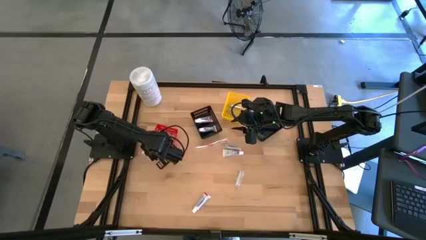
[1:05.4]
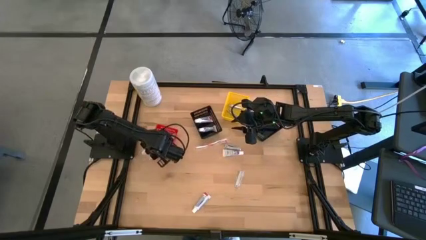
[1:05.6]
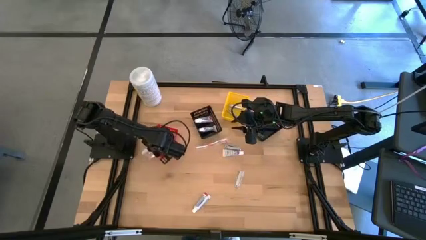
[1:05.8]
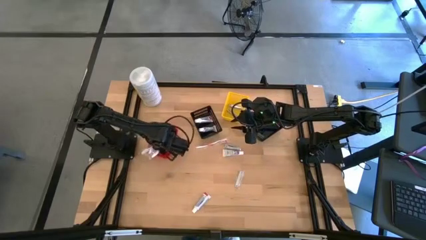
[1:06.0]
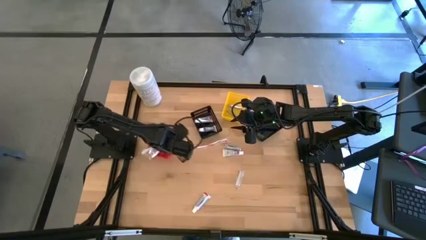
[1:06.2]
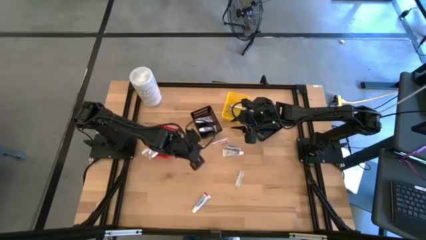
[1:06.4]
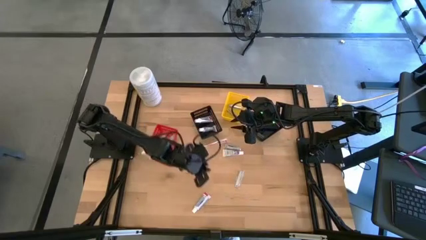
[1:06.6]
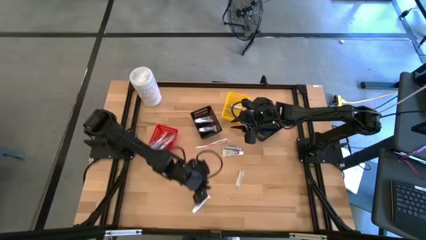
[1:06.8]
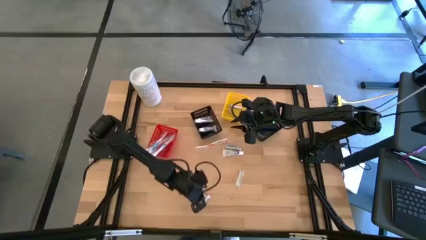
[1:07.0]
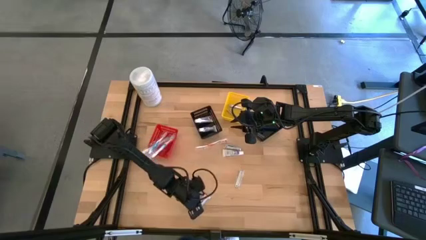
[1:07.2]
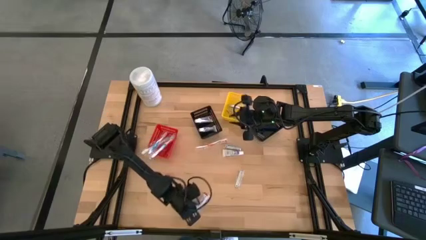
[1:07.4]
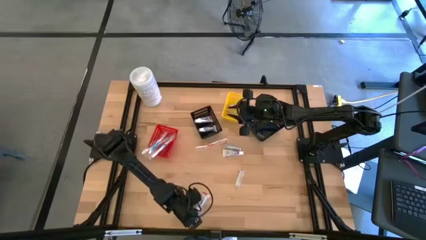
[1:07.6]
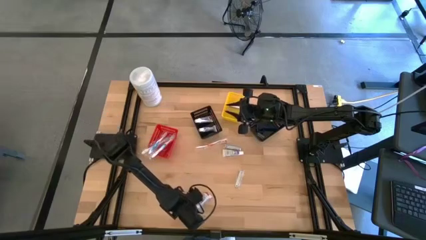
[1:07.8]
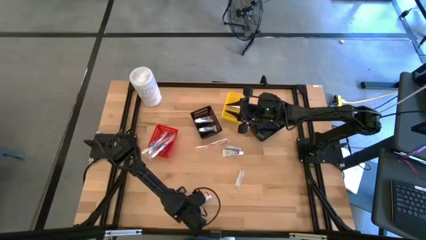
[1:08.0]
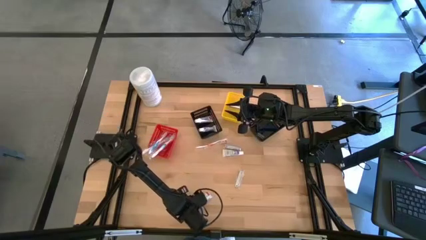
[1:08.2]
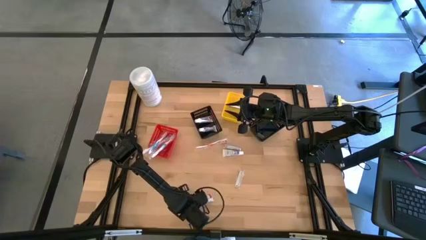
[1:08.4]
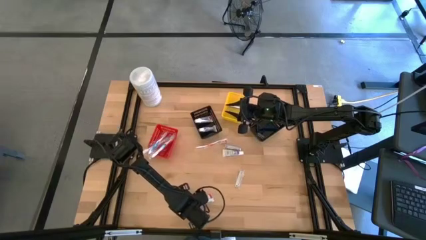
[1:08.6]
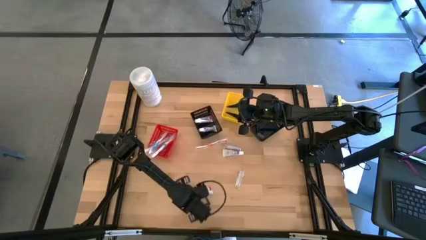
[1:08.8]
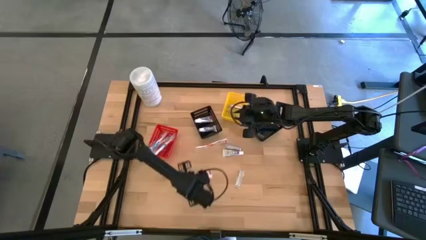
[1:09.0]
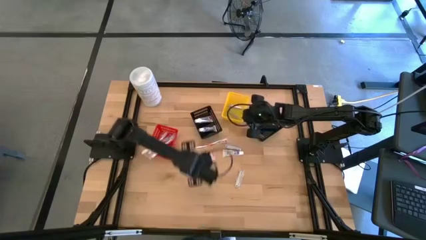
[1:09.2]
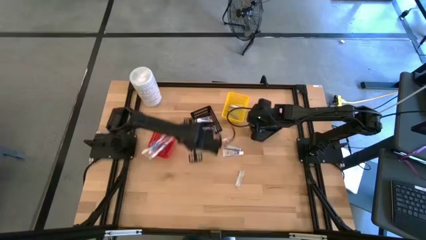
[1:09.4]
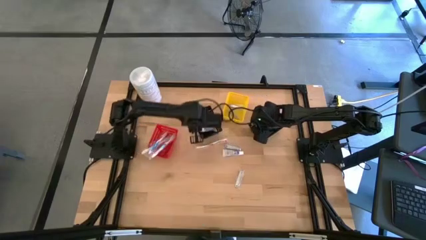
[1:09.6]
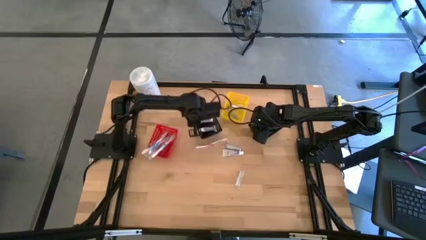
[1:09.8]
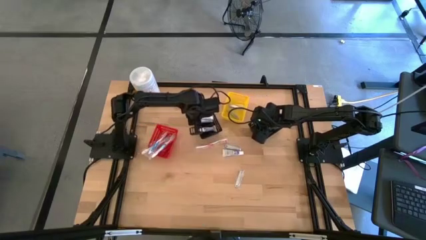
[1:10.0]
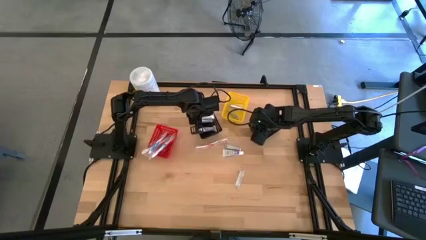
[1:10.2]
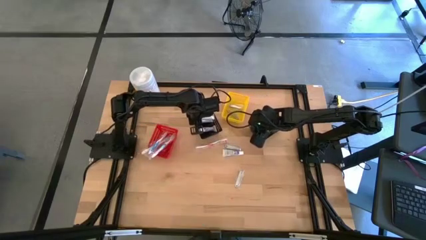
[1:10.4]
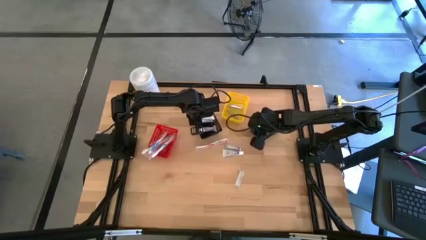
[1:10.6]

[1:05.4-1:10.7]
Task: Pick & Place Travel size toiletries
Put the toothpaste into the left black bin

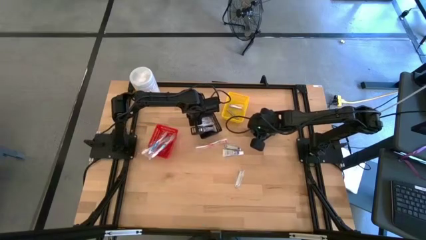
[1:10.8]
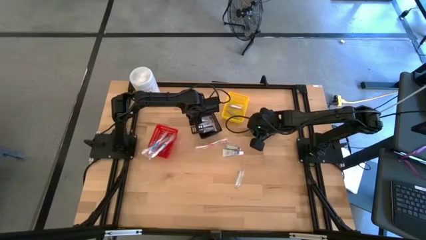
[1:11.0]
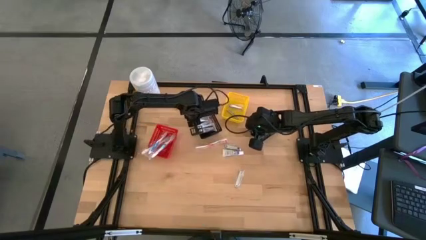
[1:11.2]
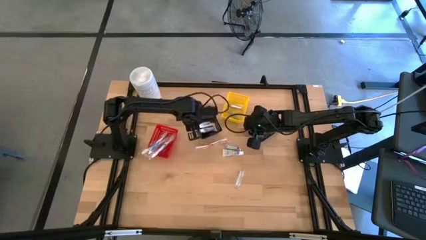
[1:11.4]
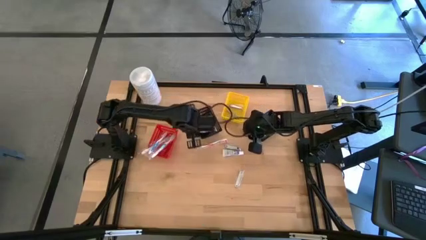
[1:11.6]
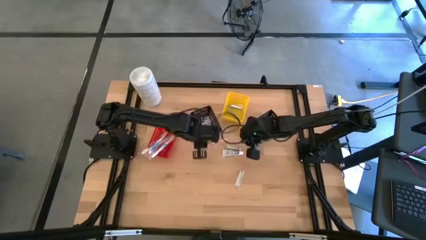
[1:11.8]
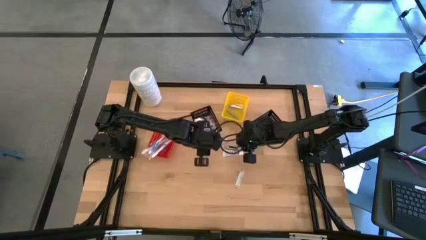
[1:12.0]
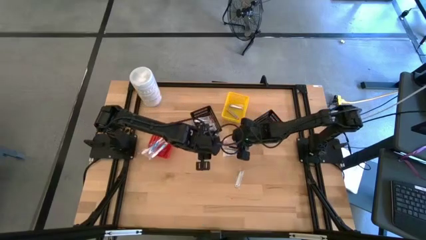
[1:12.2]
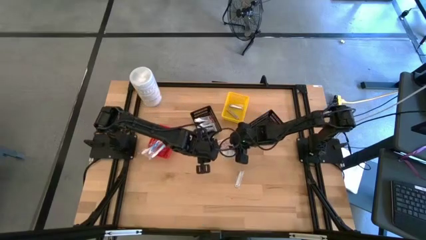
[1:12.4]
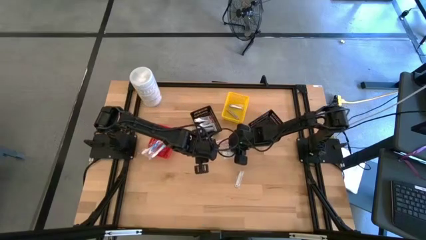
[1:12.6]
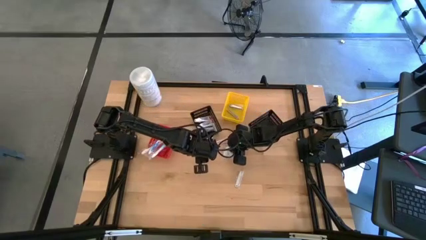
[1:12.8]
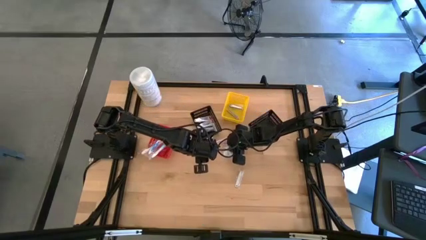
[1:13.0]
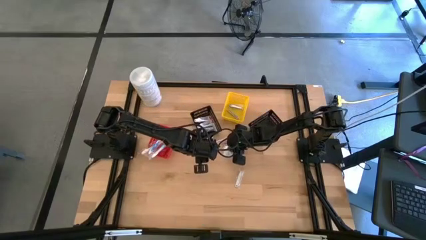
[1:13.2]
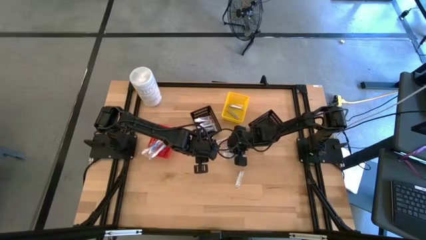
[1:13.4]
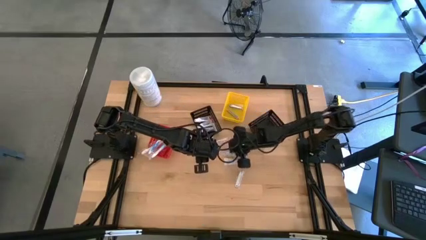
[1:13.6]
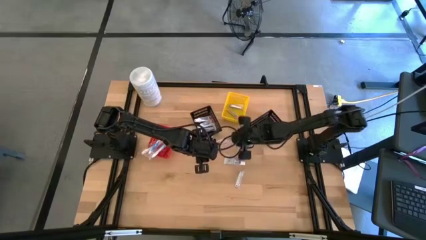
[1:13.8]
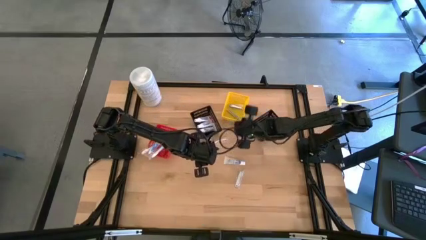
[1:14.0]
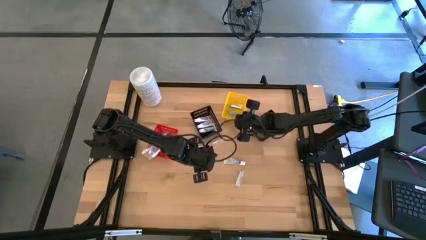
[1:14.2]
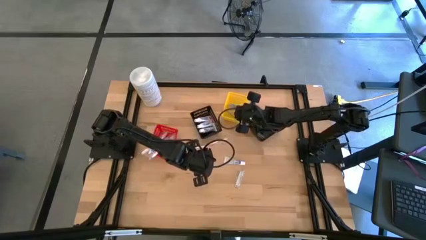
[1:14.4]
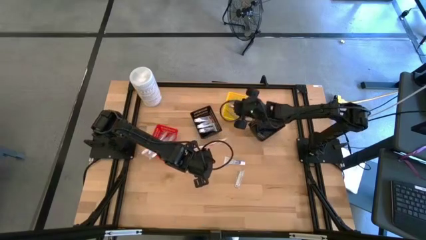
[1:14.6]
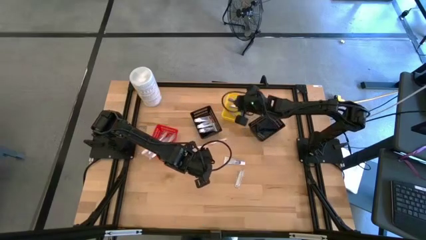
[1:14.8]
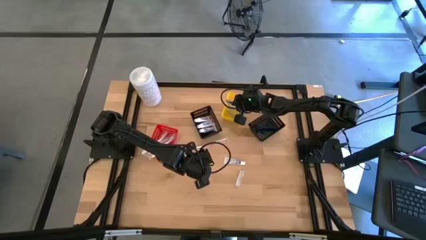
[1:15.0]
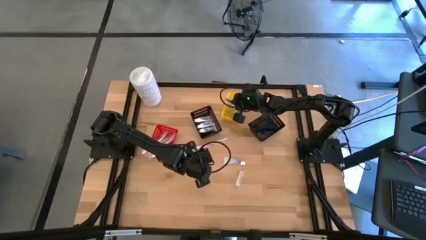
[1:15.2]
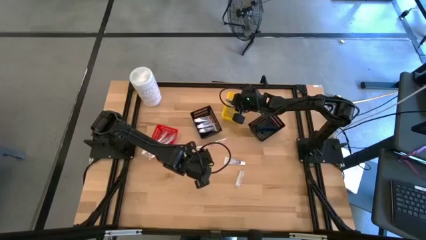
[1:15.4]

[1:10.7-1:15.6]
Put the nail cutter into the yellow bin

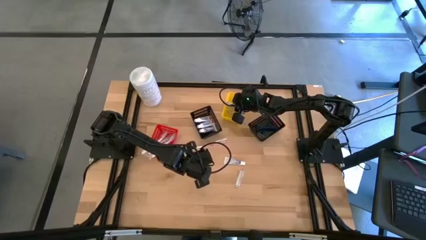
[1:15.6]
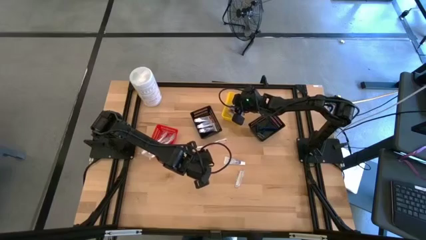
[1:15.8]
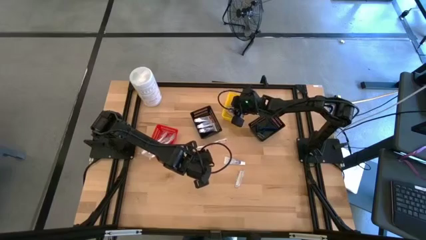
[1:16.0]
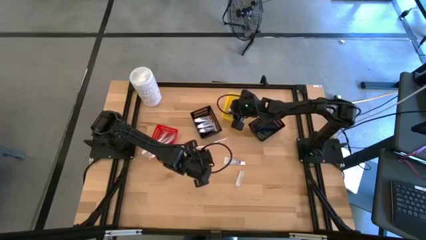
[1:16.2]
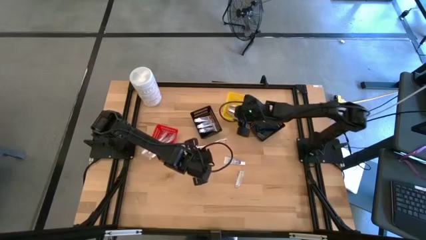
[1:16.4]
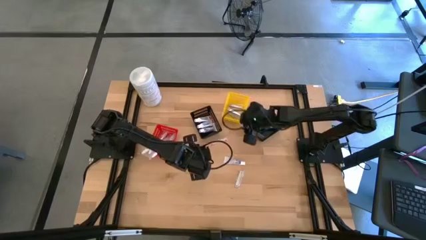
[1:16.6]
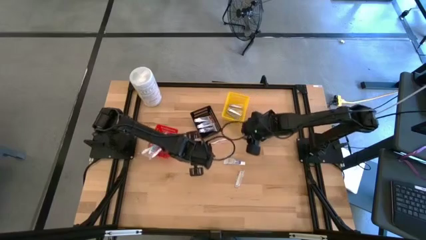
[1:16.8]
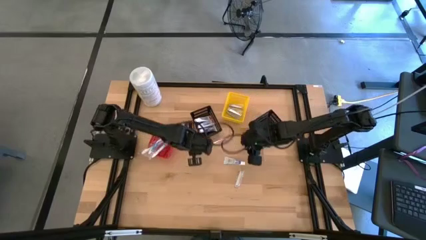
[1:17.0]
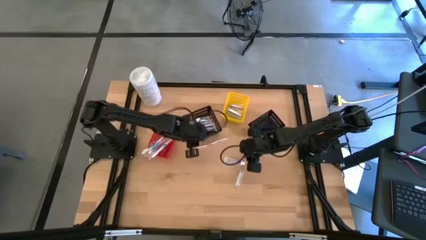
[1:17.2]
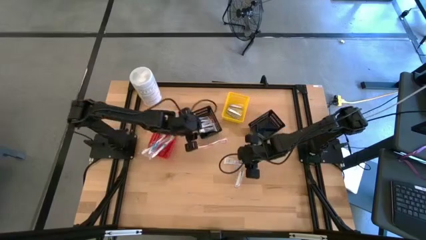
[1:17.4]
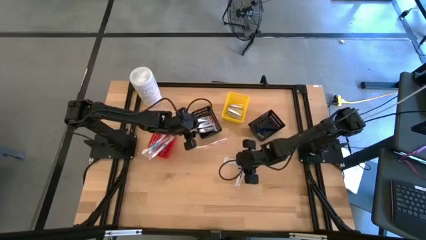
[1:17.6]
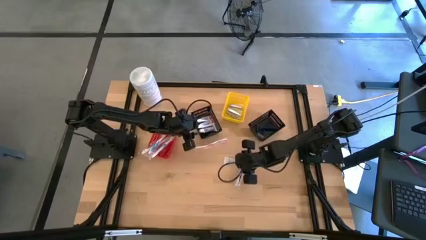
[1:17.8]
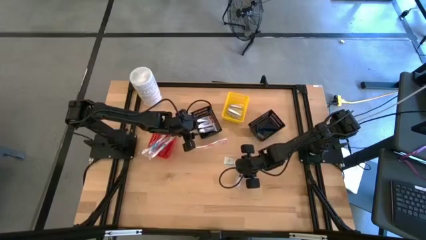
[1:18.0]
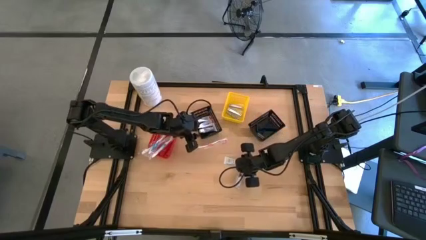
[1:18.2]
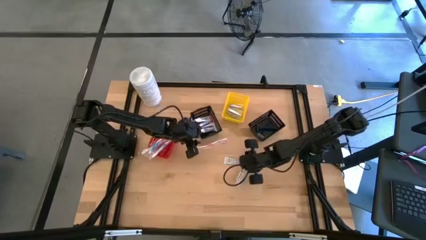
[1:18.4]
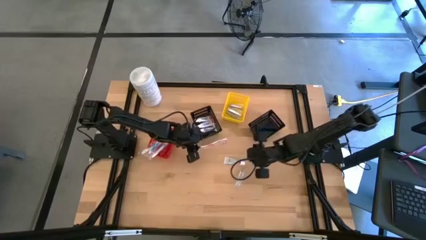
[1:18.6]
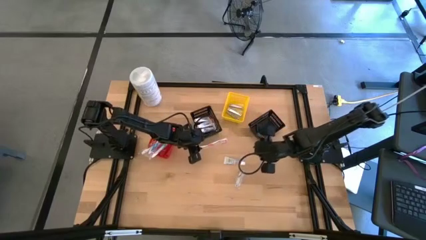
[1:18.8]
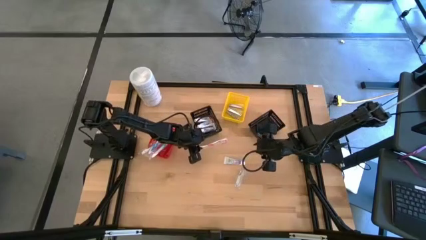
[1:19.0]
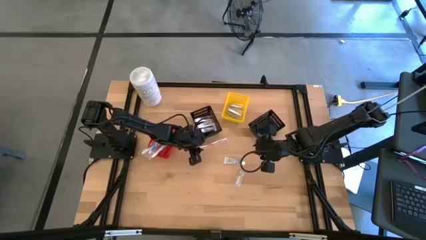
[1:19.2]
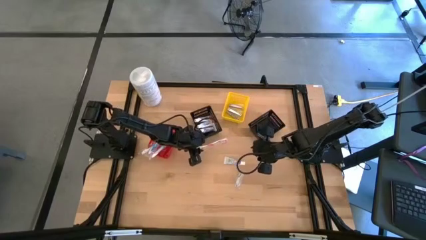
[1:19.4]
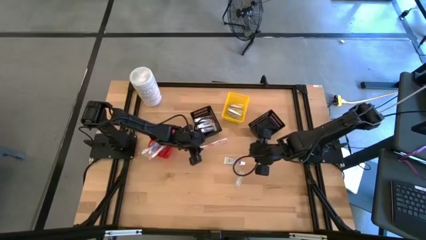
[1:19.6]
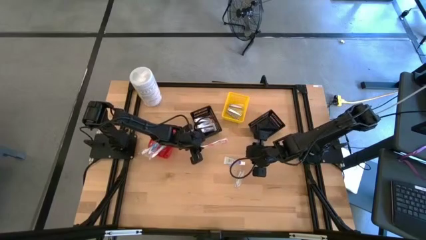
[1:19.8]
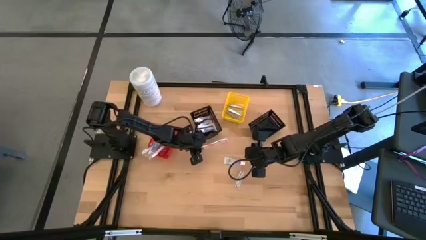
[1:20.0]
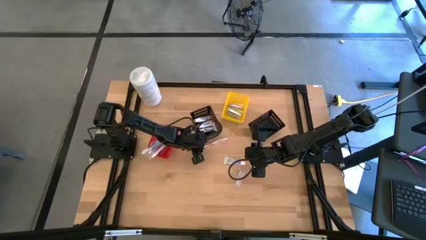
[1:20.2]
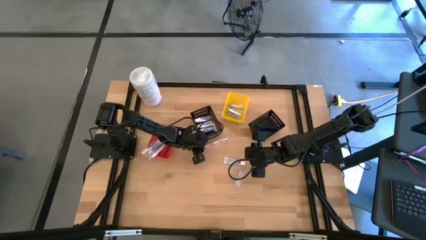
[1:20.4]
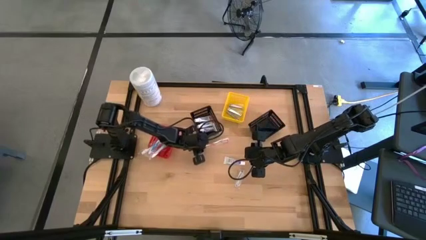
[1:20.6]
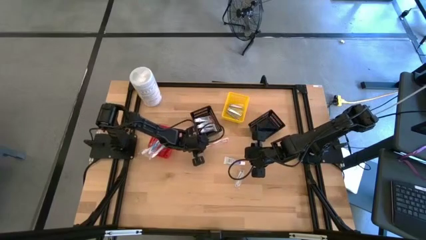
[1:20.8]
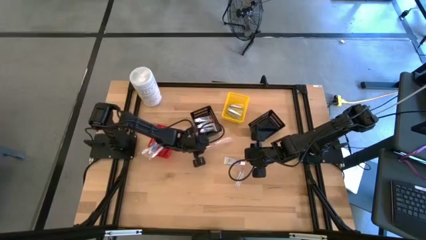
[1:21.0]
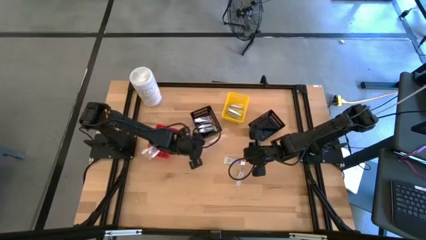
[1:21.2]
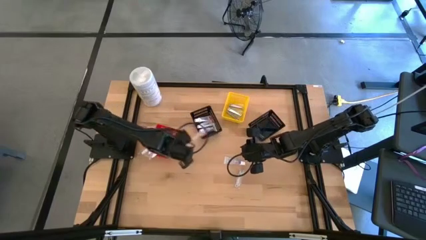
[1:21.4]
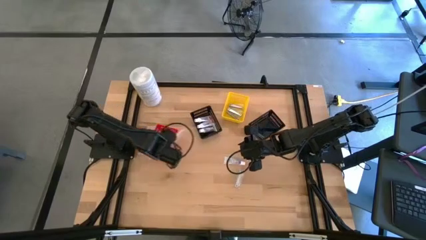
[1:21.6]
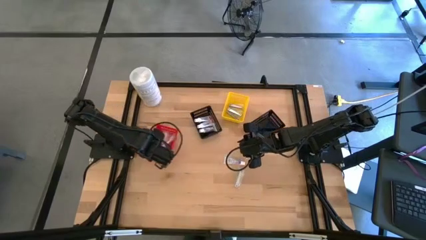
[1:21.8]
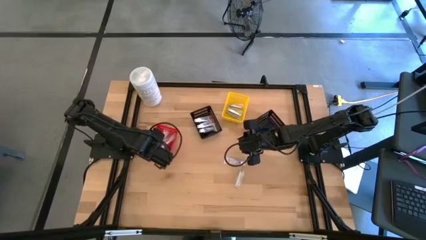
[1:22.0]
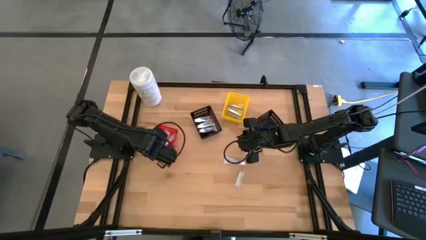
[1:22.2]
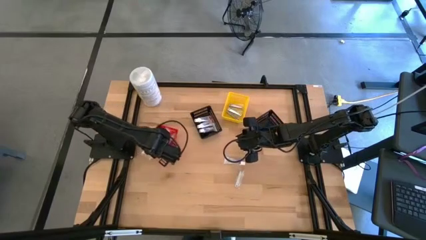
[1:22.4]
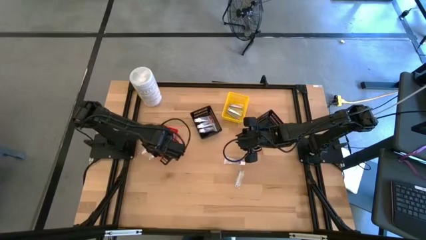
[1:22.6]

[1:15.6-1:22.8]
Put the orange toothbrush into the red bin
